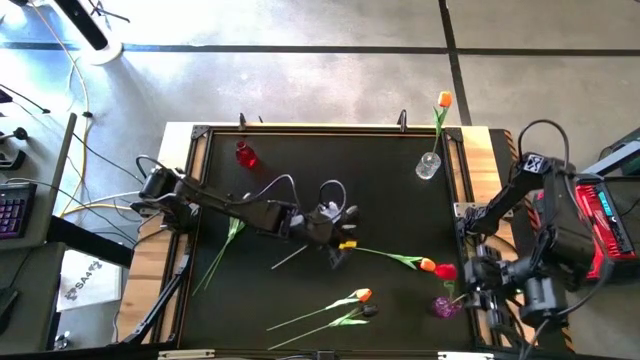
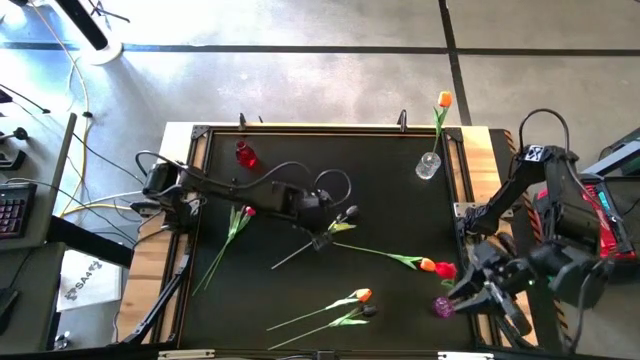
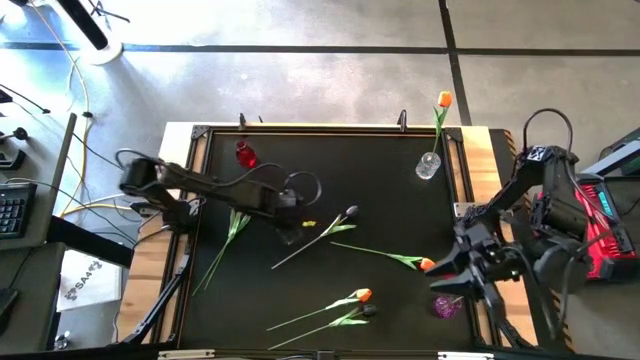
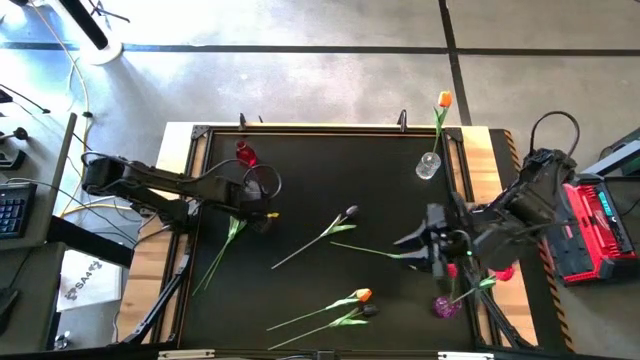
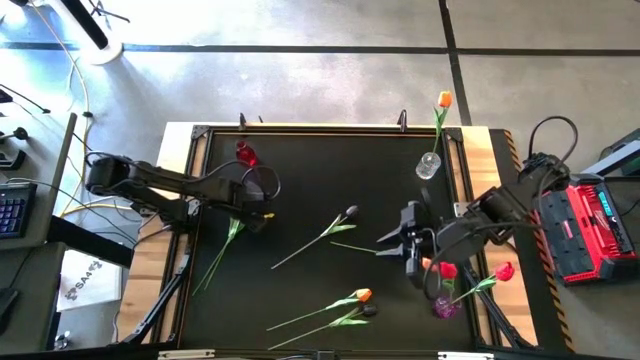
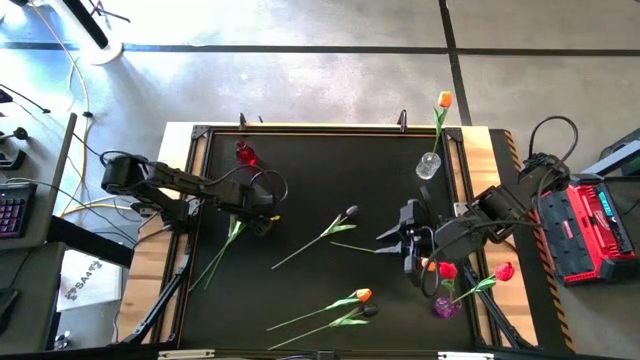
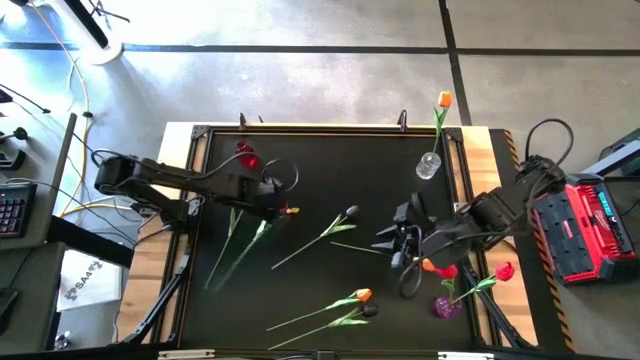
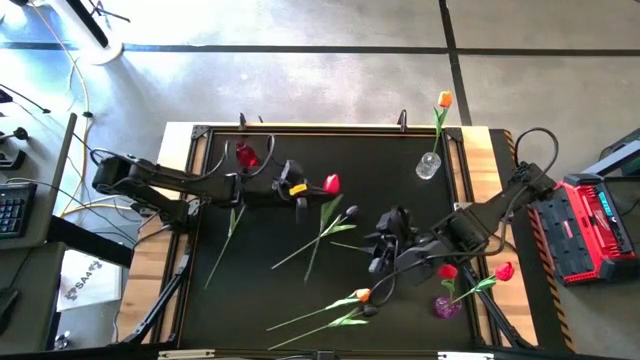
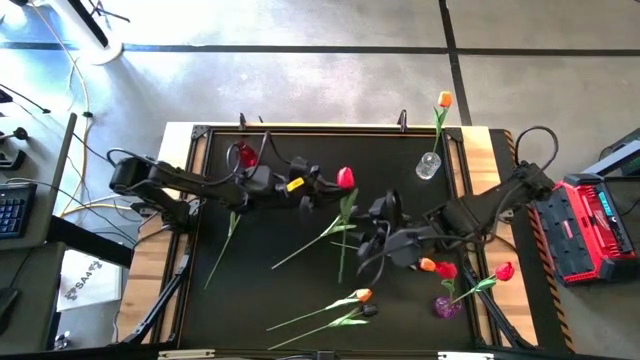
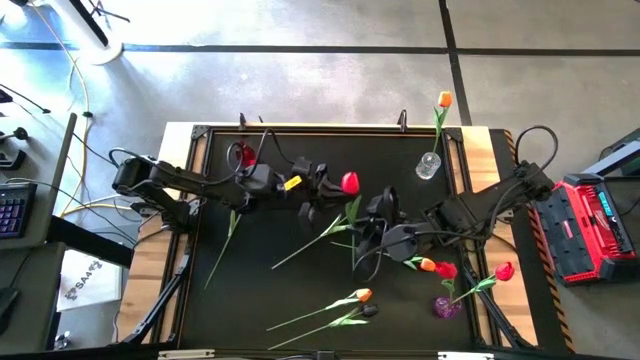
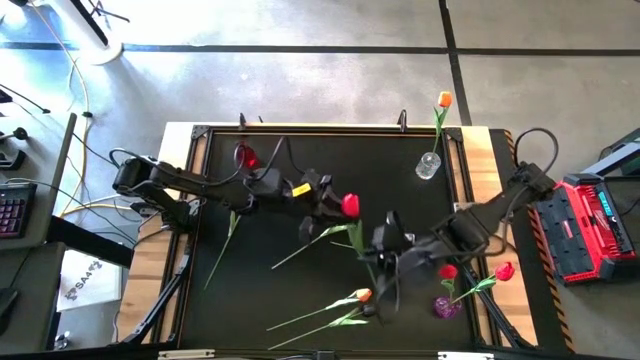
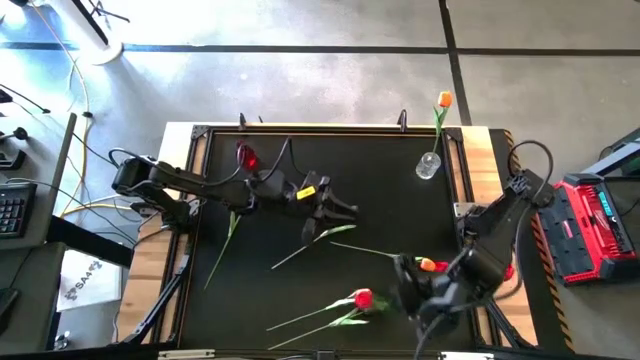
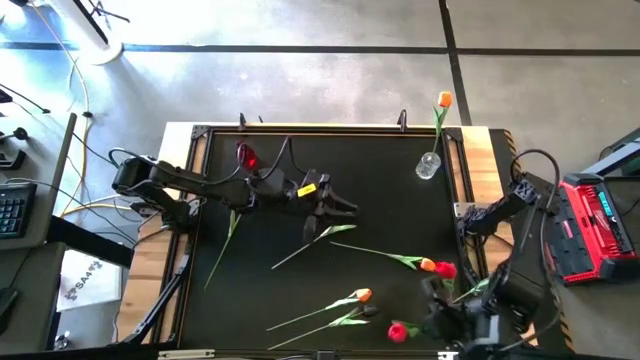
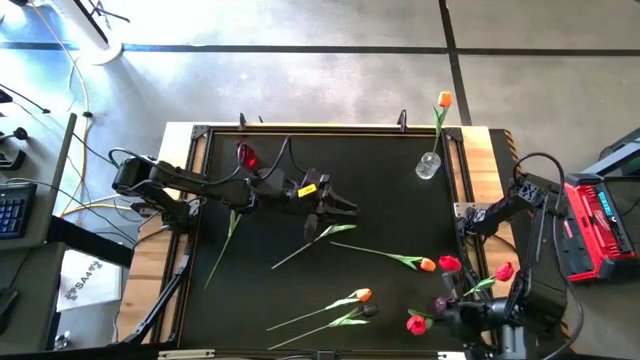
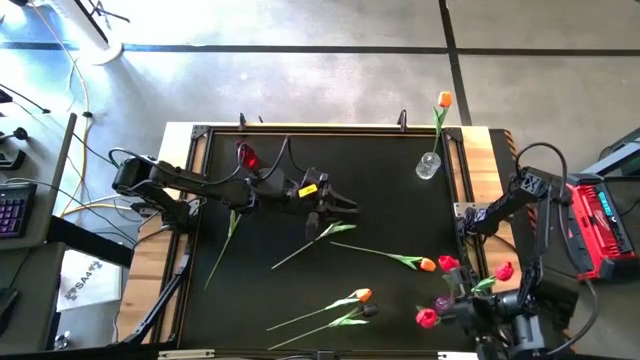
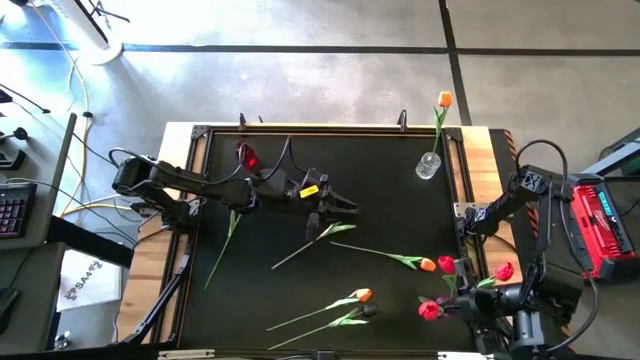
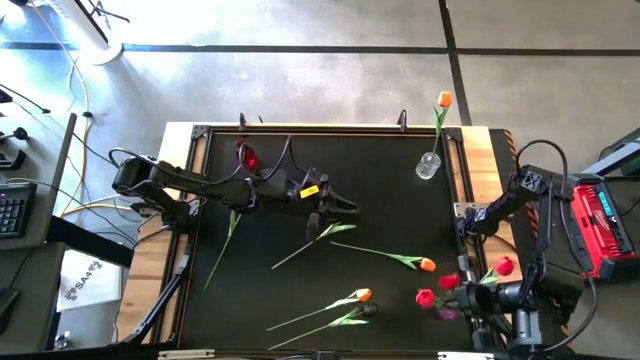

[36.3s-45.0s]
Task: Sort flowers into vase by color
Put the red tulip into the purple vase

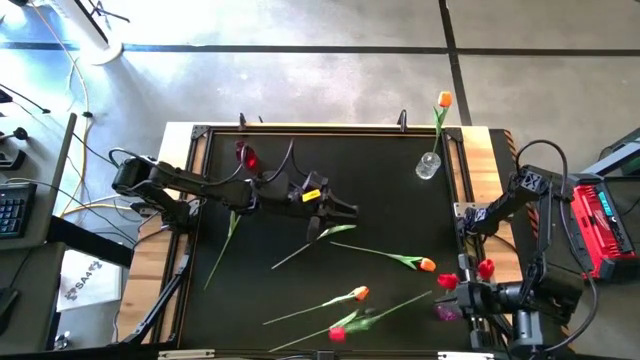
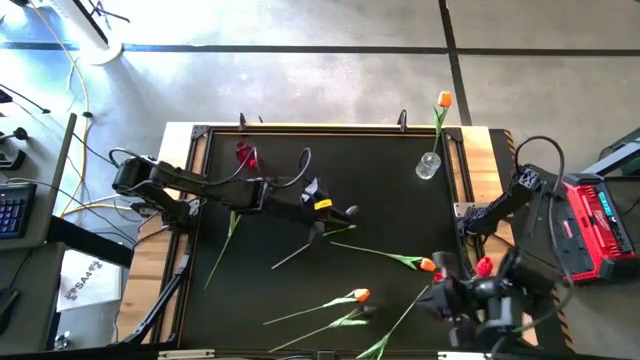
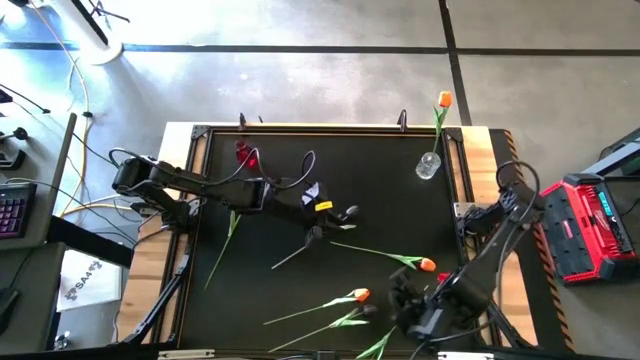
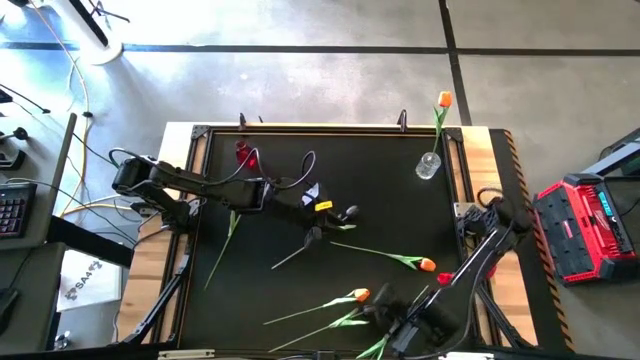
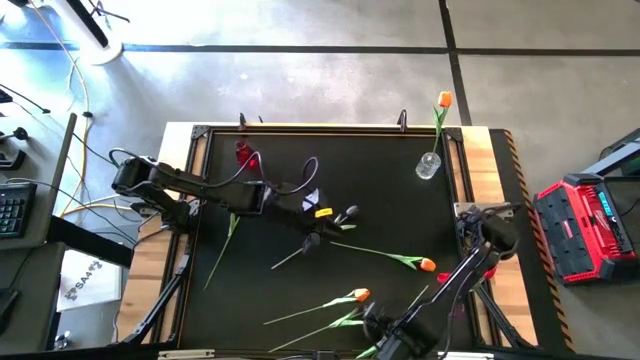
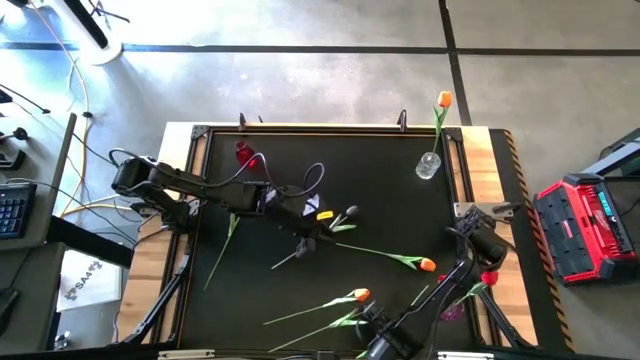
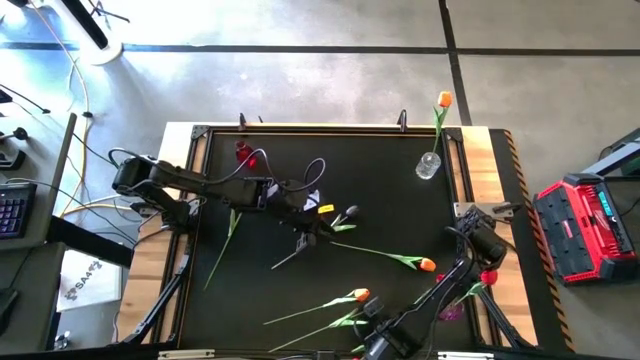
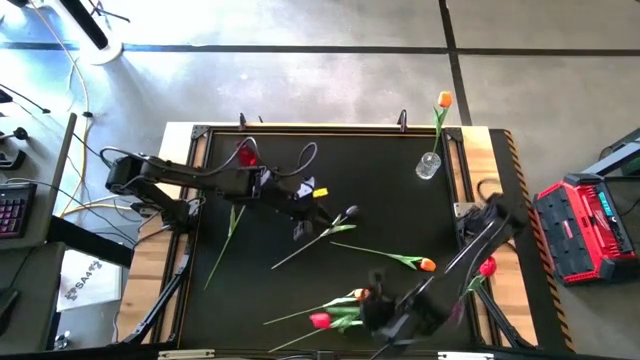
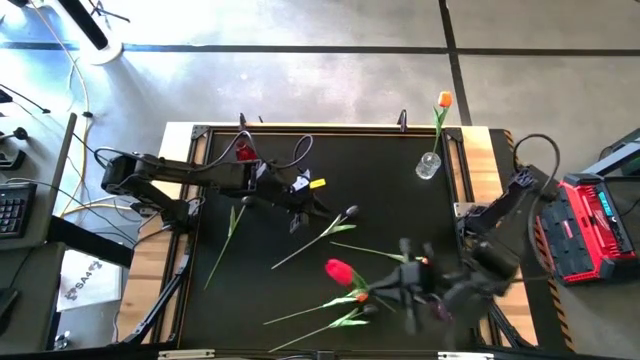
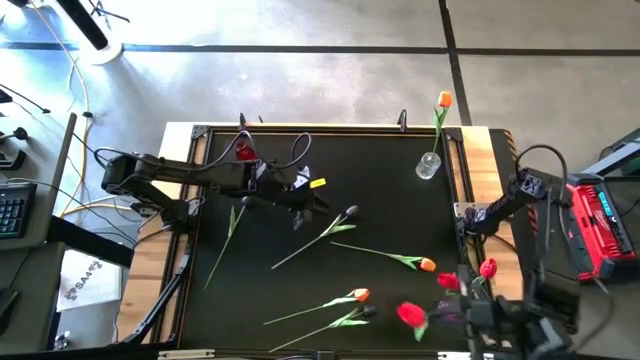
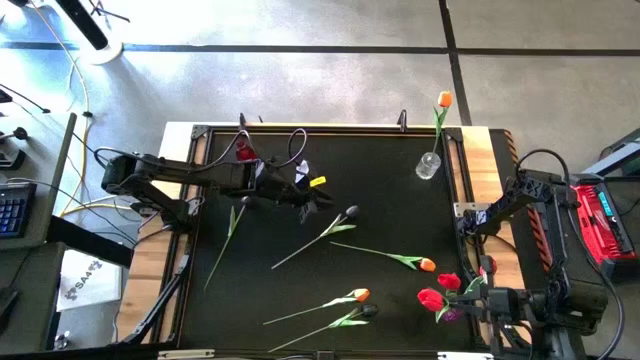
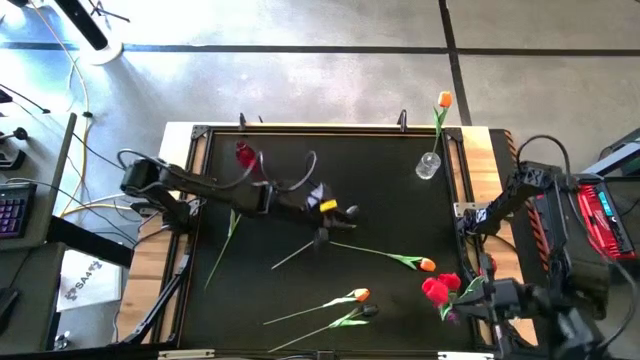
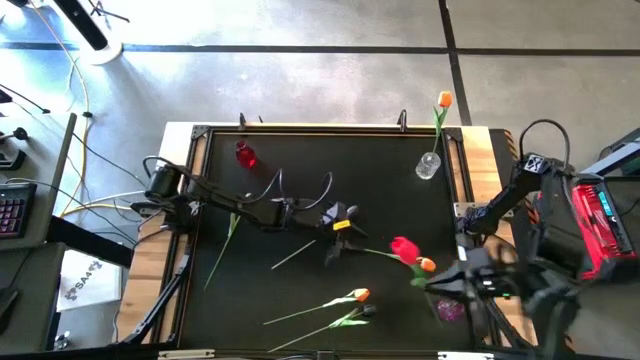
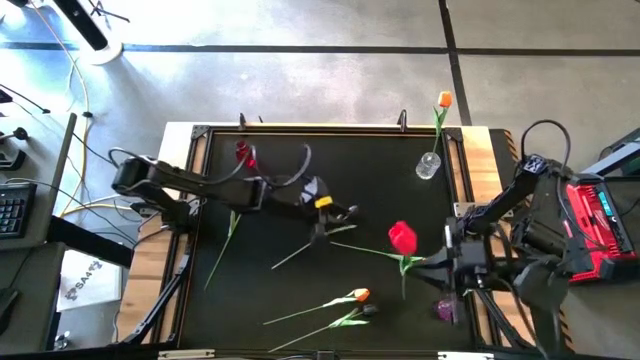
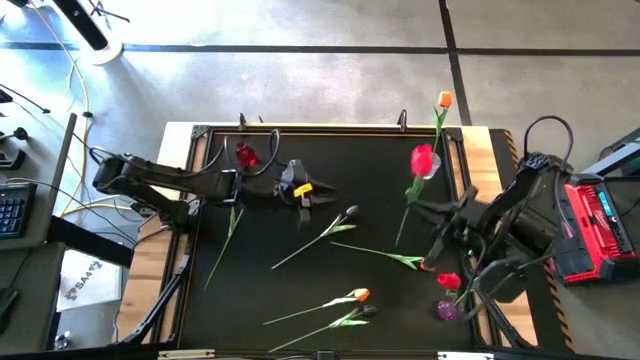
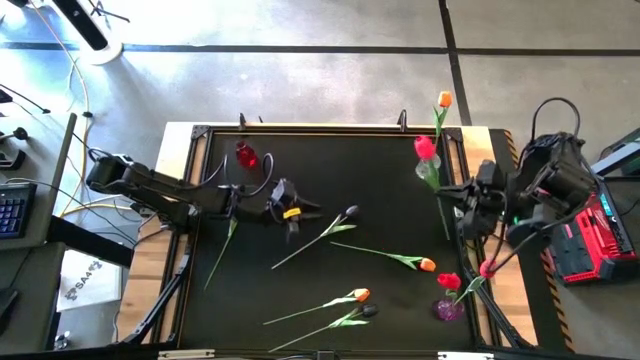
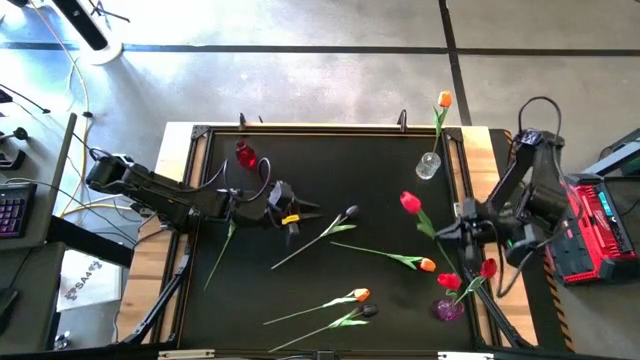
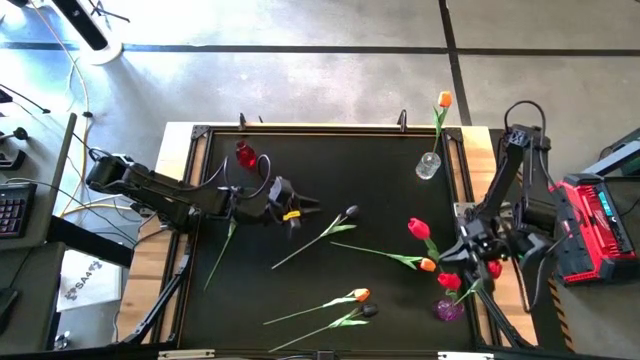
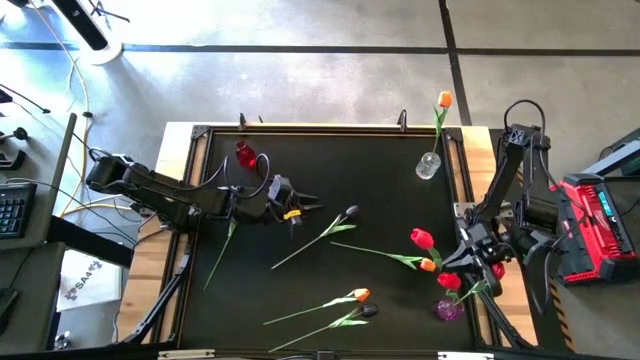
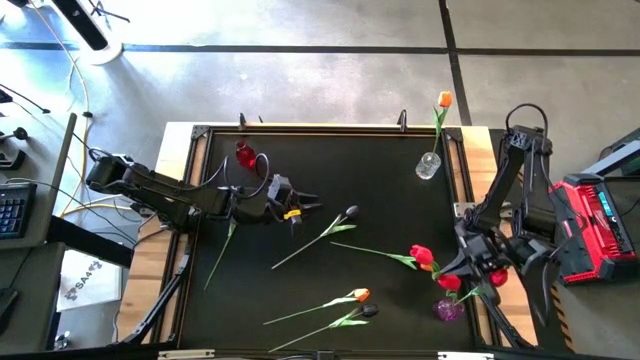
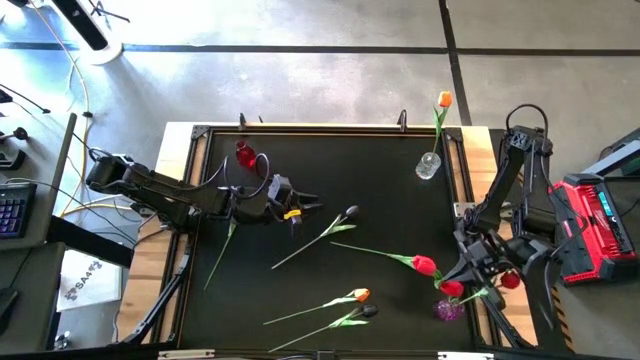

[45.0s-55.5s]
Put the red tulip into the purple vase
